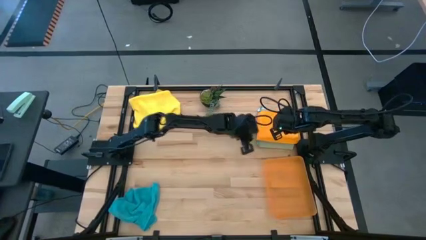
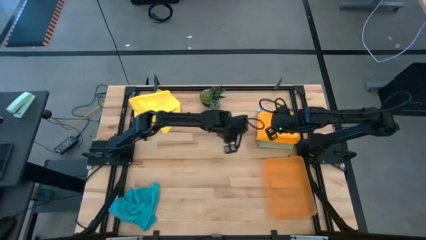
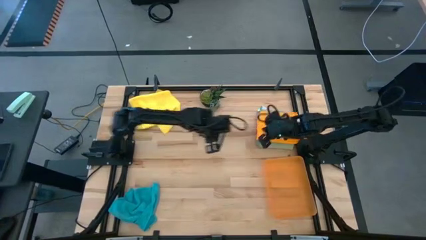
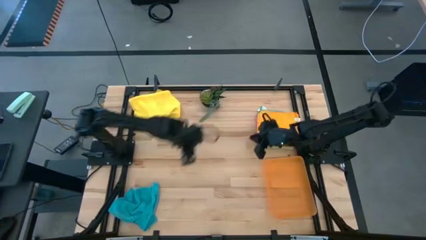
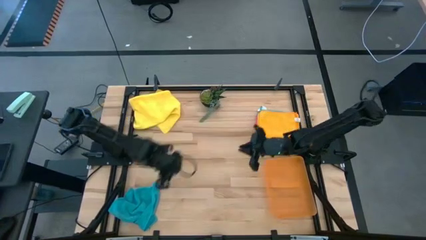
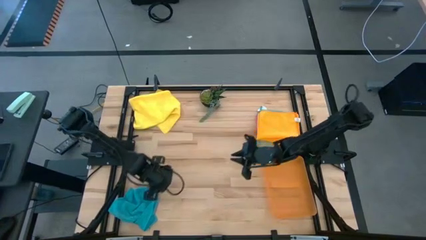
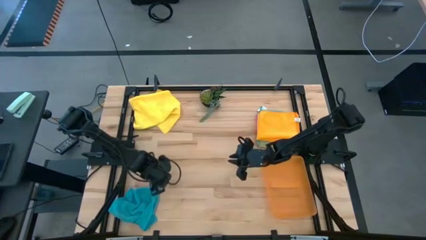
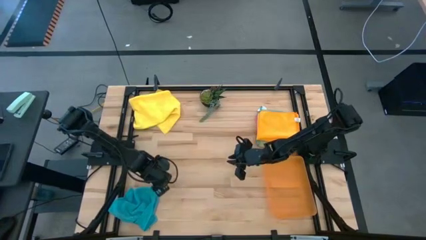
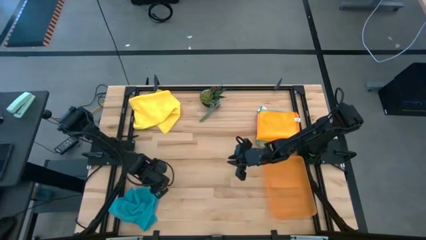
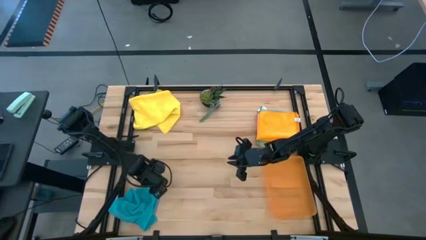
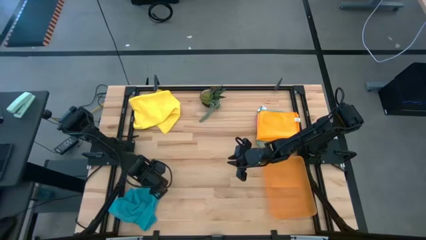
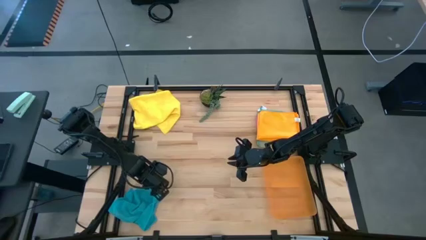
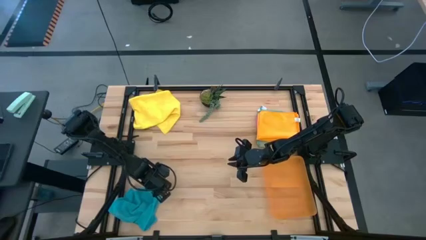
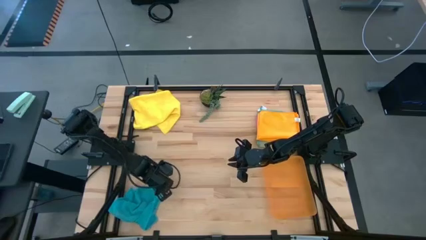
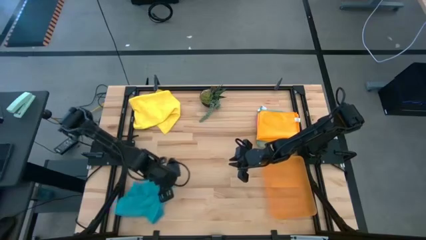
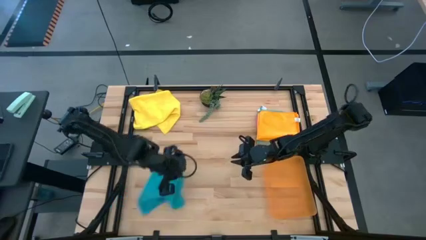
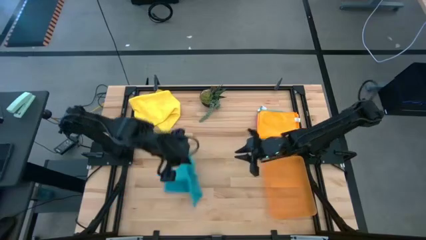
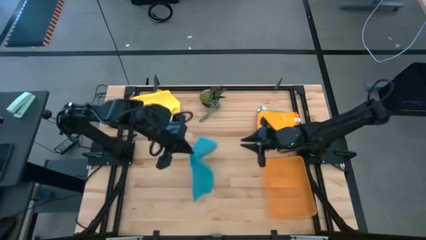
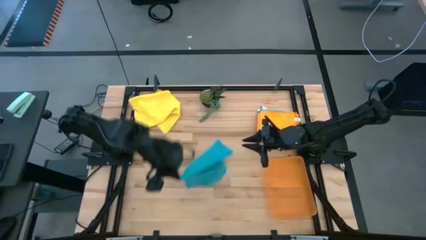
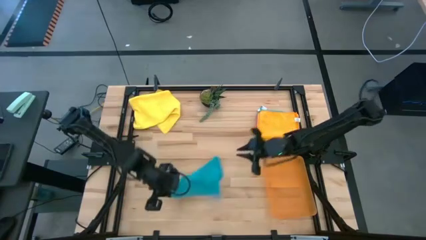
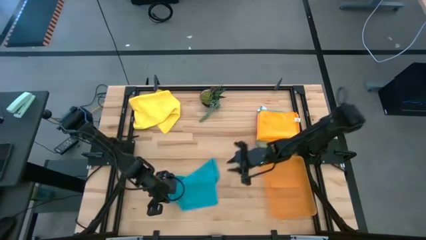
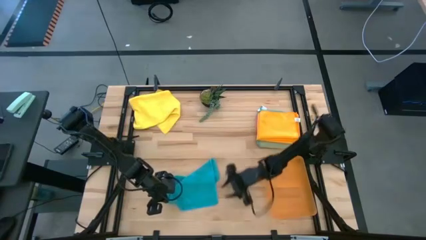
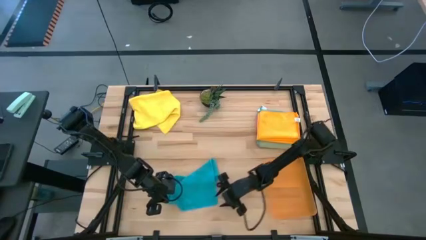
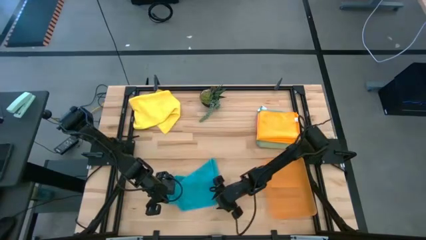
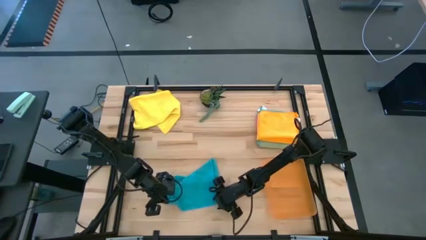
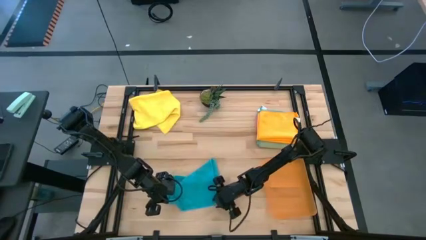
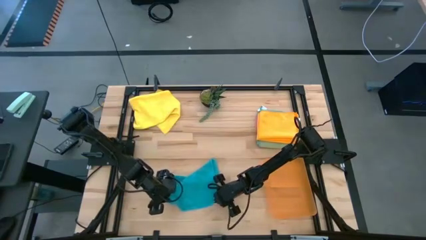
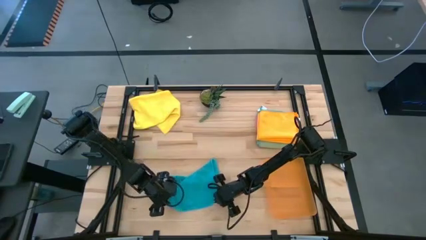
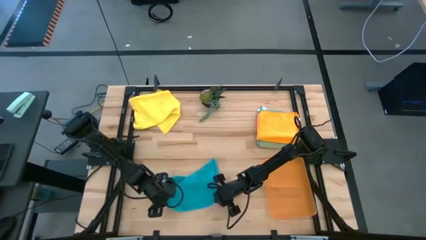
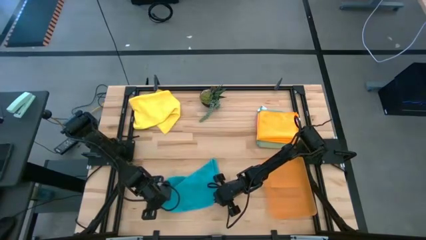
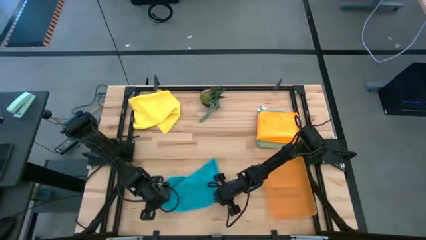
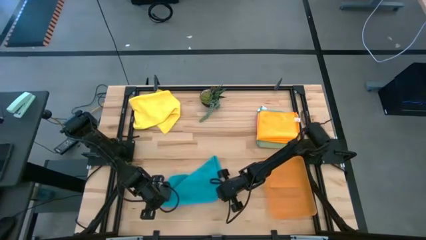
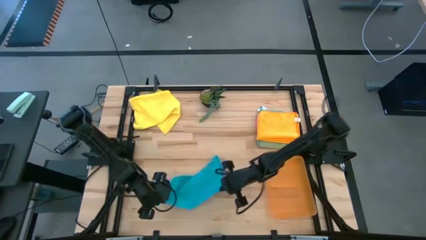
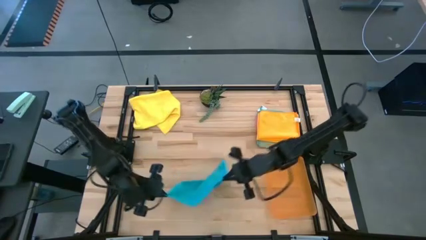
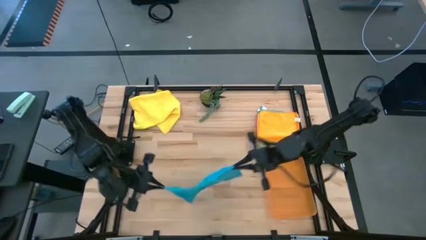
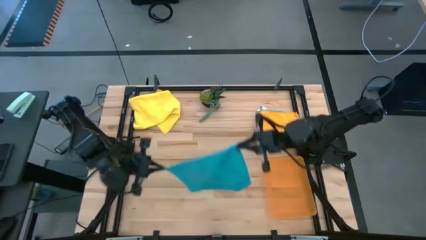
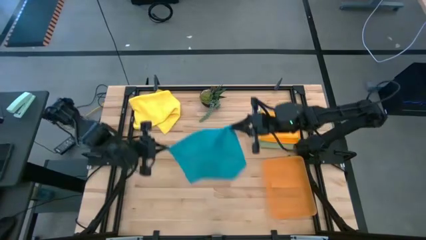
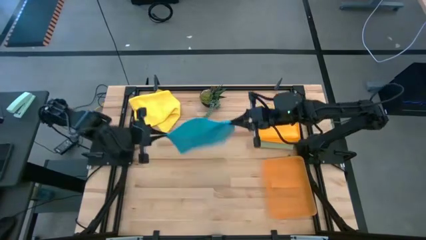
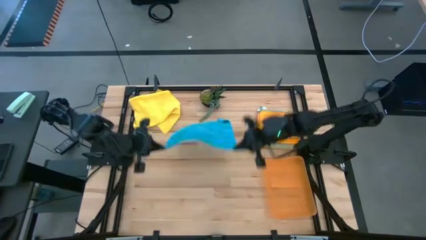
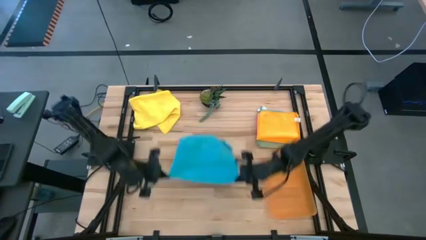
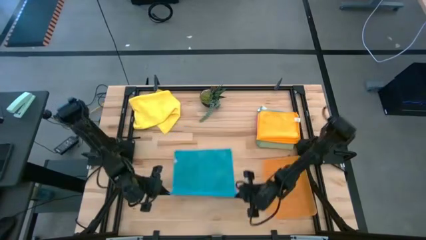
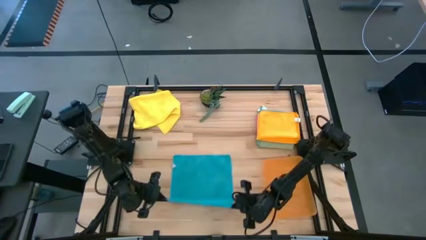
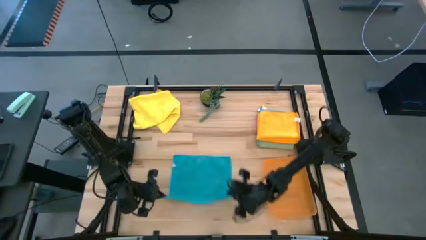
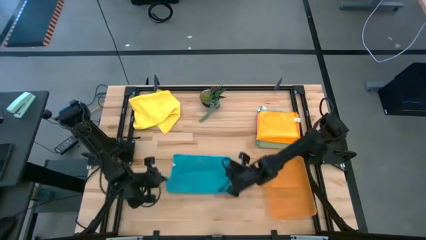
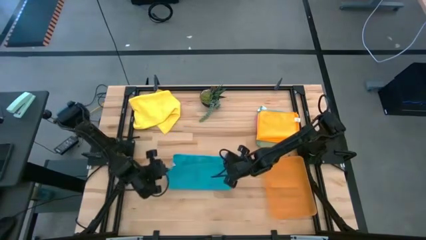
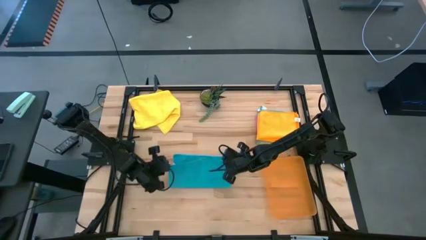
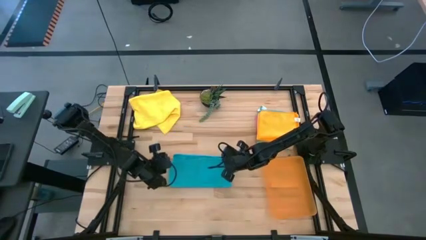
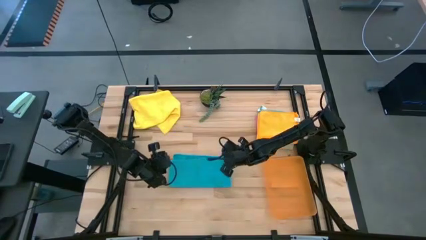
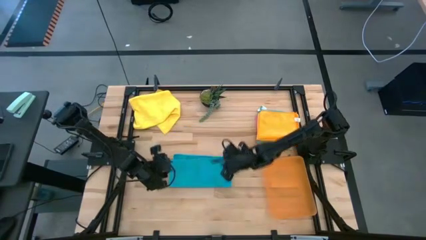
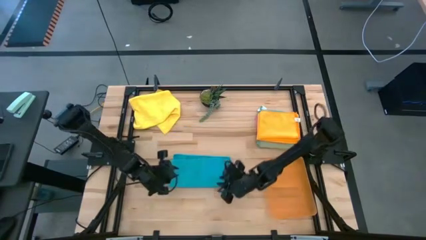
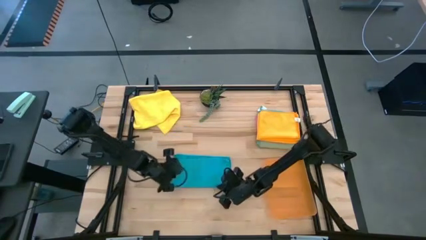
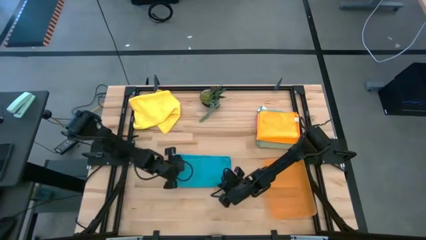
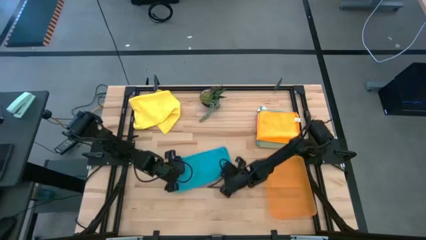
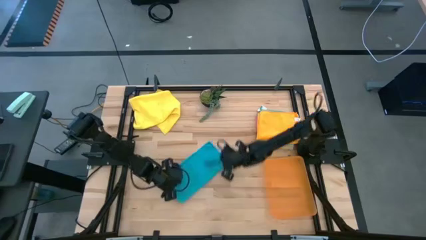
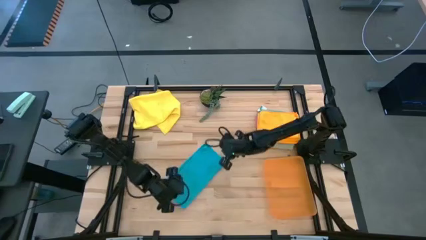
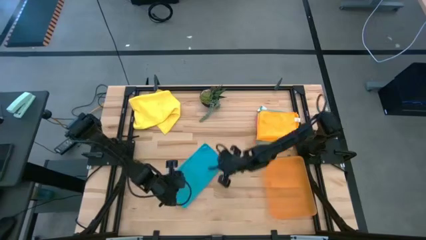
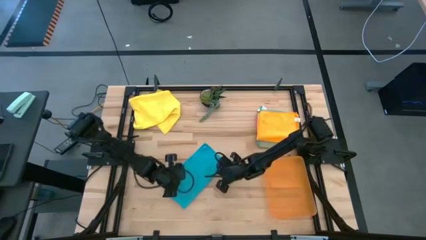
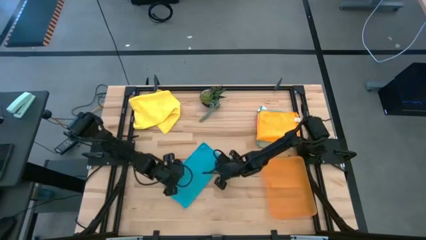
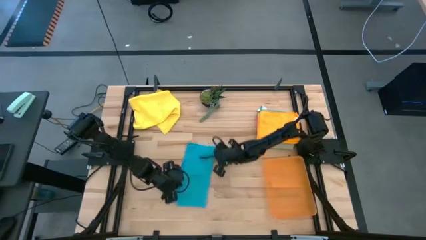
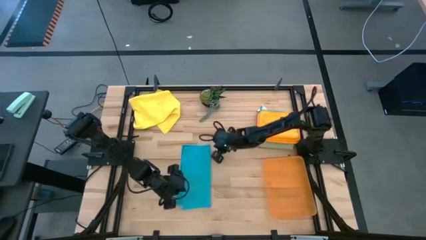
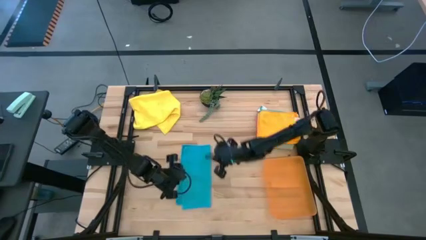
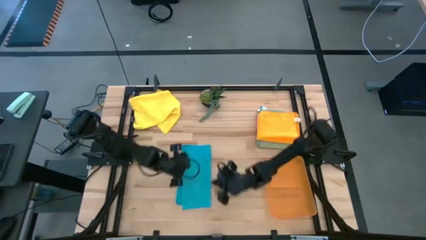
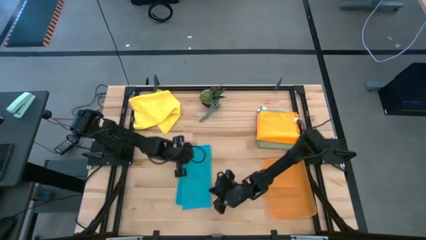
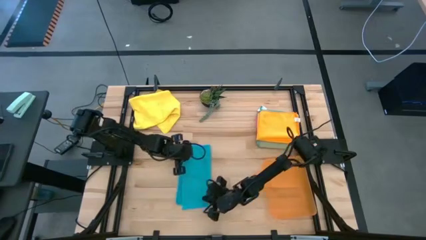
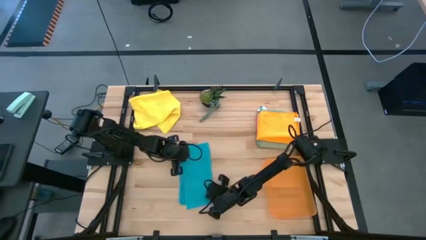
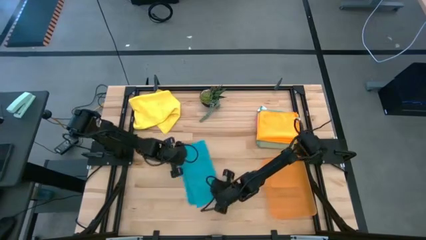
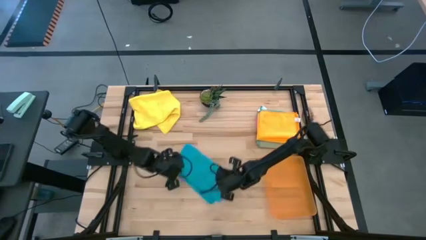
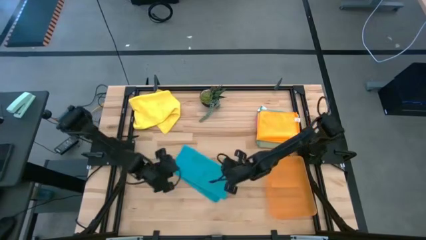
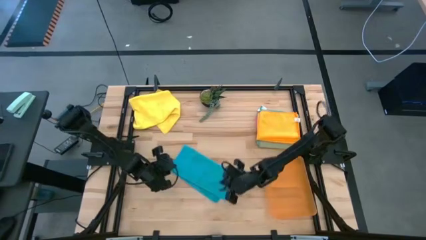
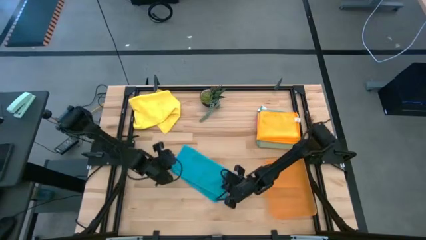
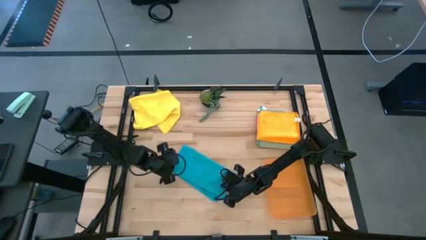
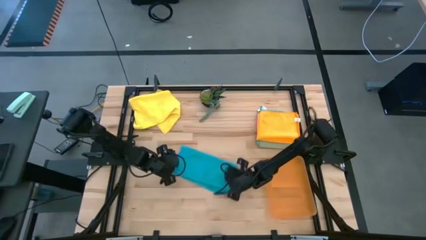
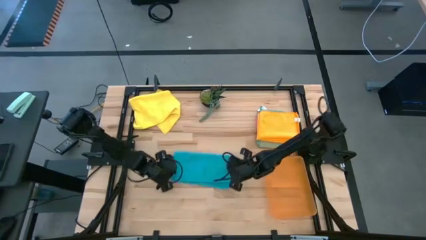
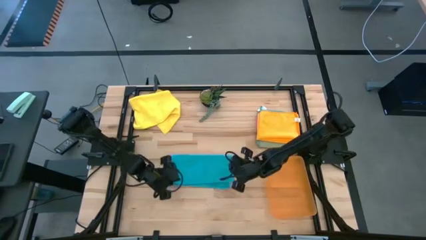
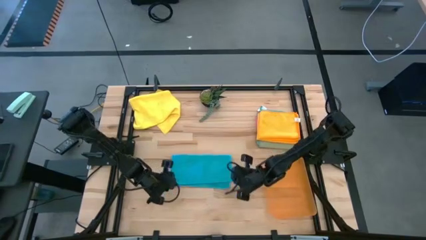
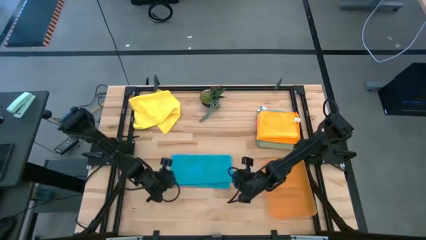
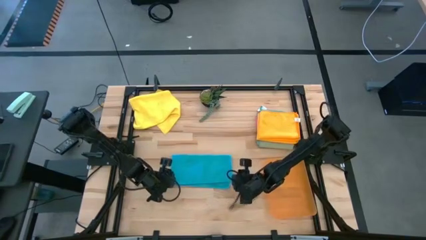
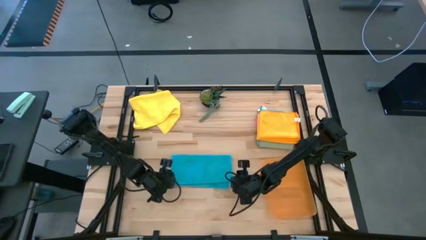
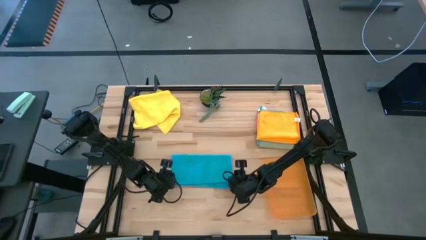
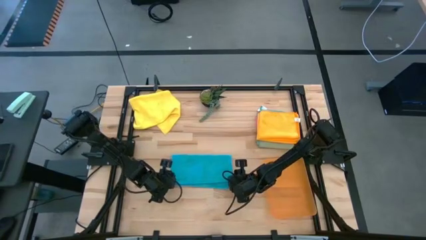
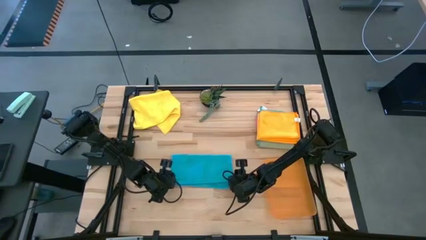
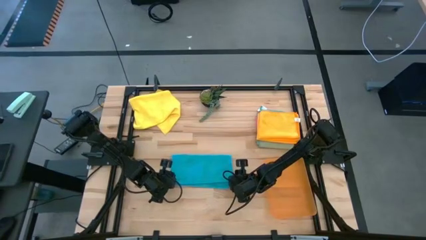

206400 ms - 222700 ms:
Task: Fold microfiber towels
Fold the blue microfiber towel
